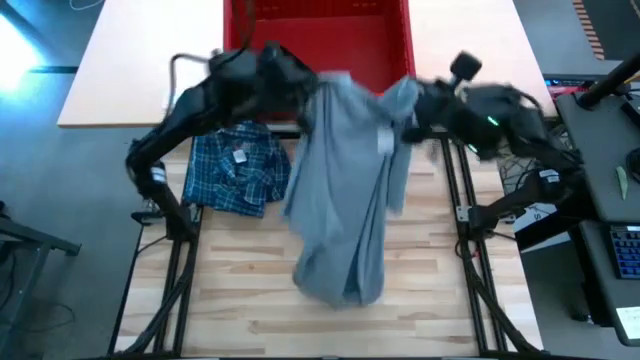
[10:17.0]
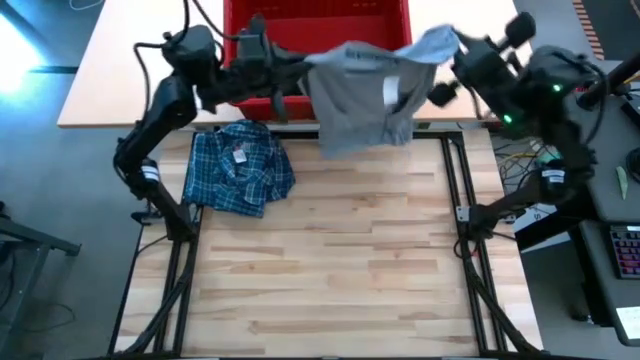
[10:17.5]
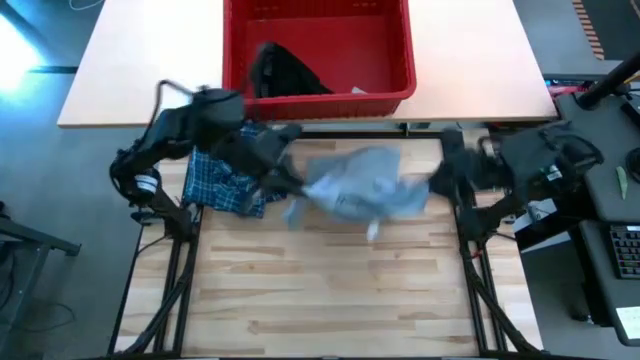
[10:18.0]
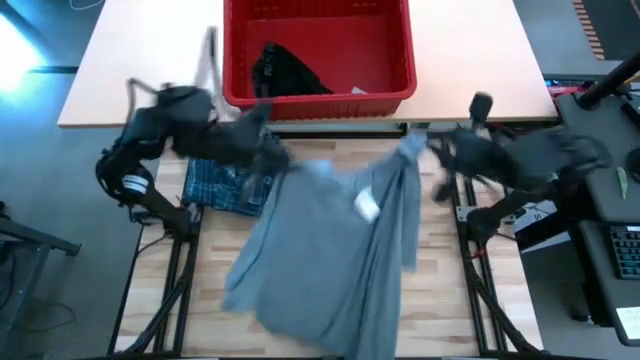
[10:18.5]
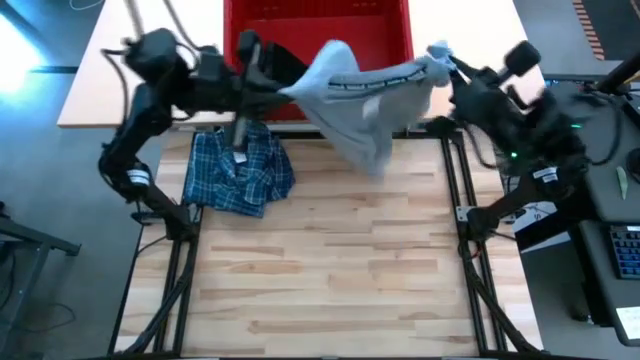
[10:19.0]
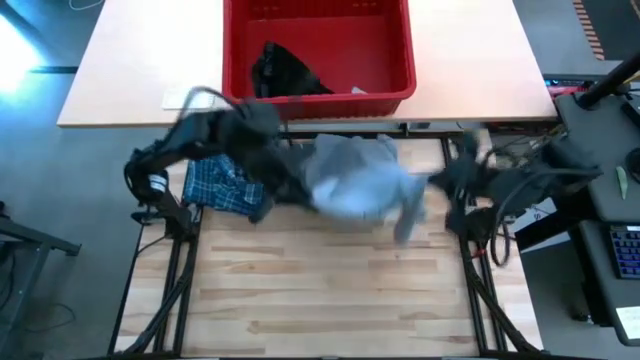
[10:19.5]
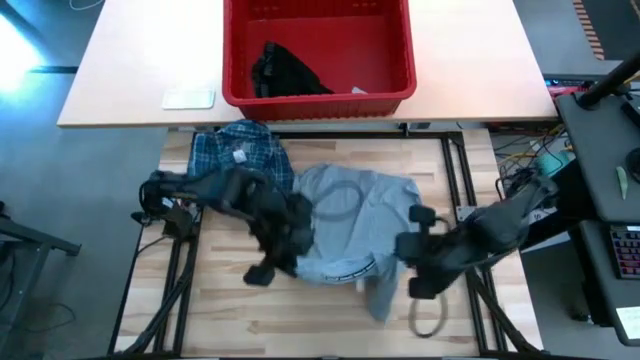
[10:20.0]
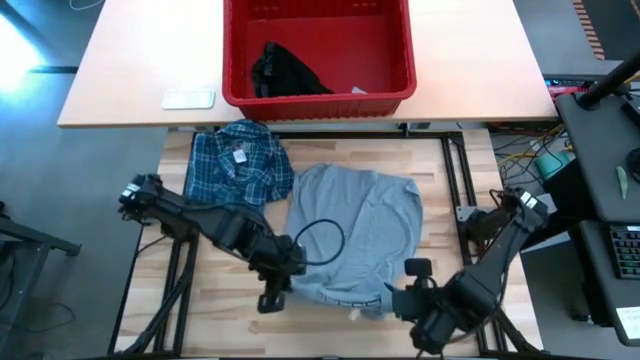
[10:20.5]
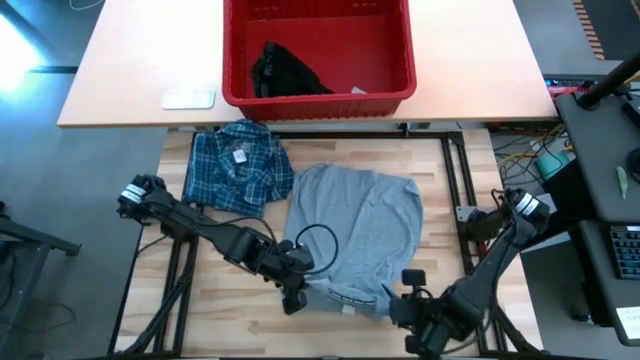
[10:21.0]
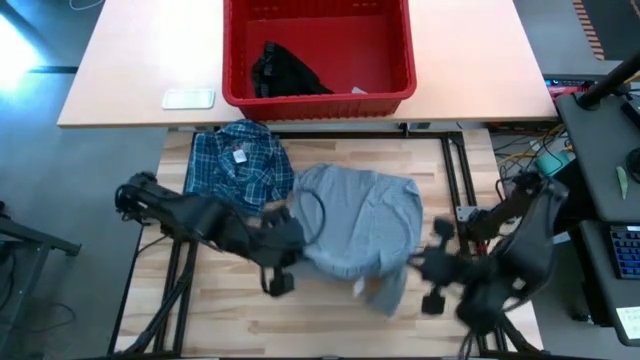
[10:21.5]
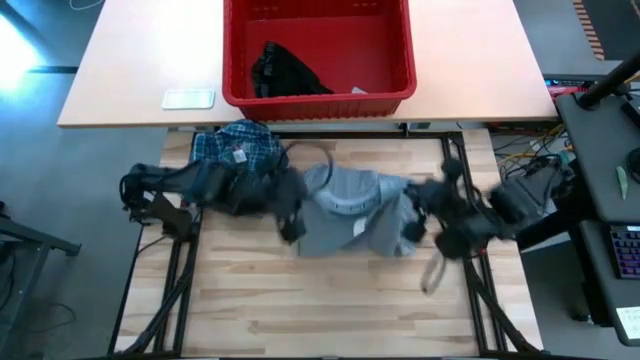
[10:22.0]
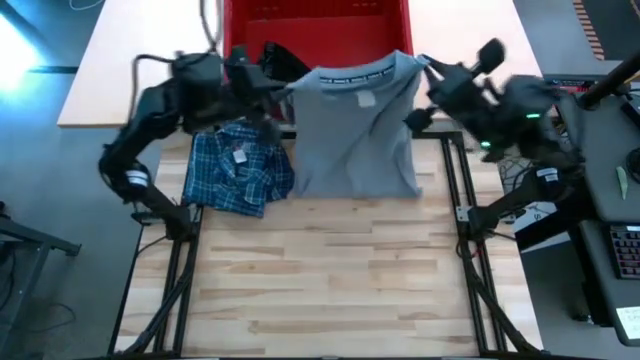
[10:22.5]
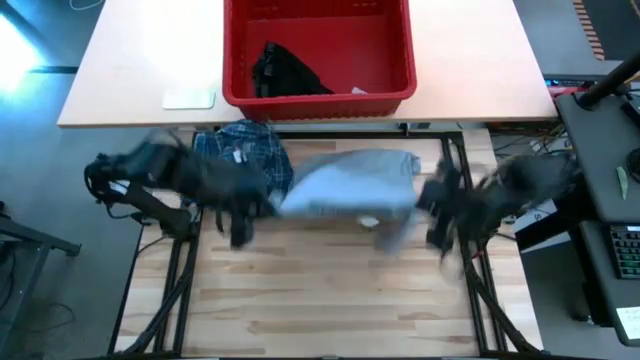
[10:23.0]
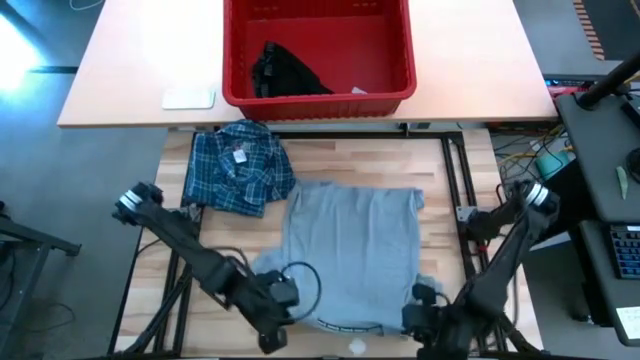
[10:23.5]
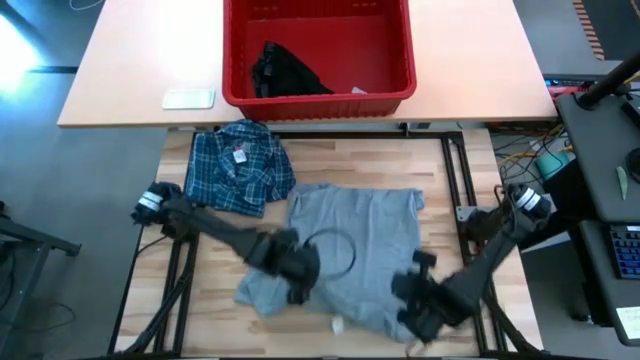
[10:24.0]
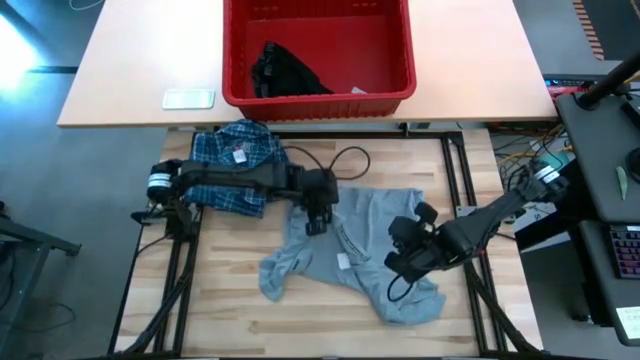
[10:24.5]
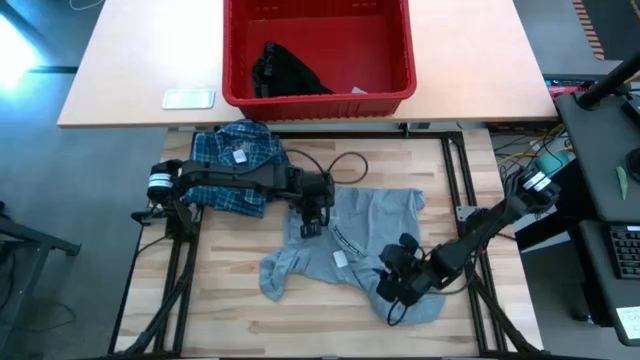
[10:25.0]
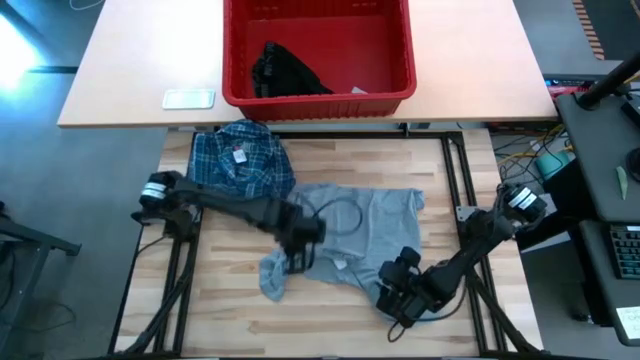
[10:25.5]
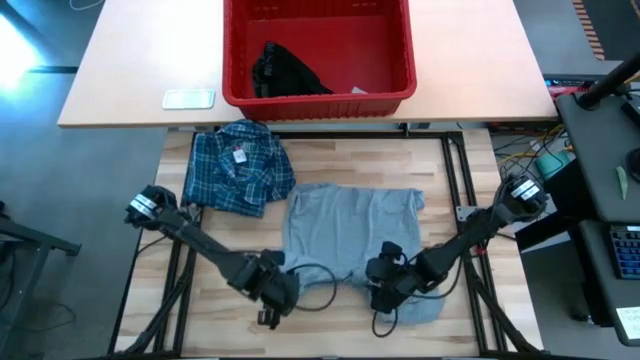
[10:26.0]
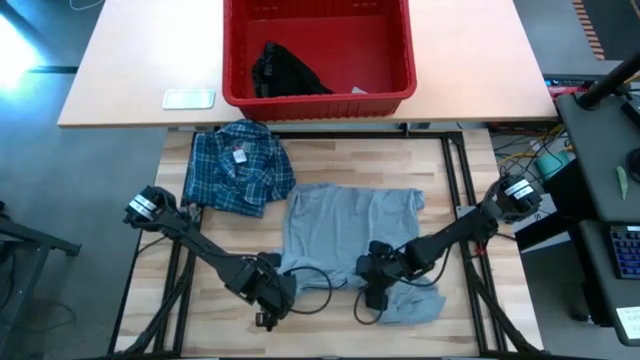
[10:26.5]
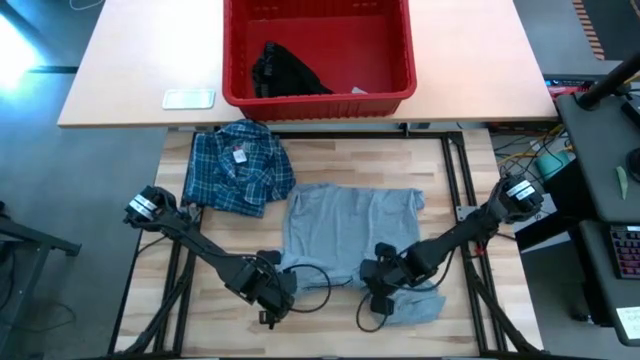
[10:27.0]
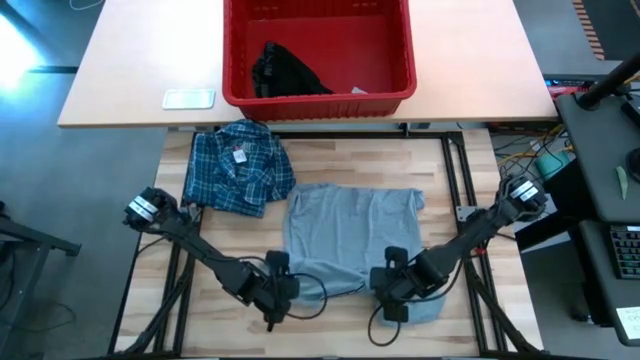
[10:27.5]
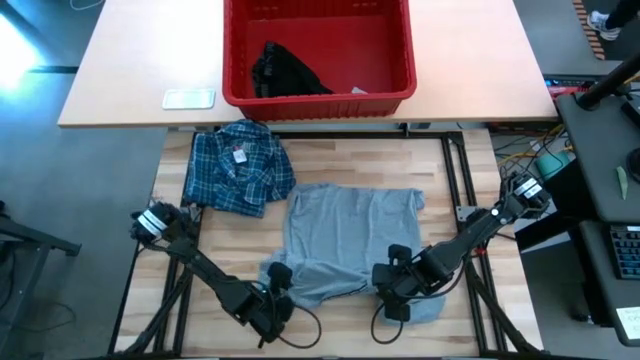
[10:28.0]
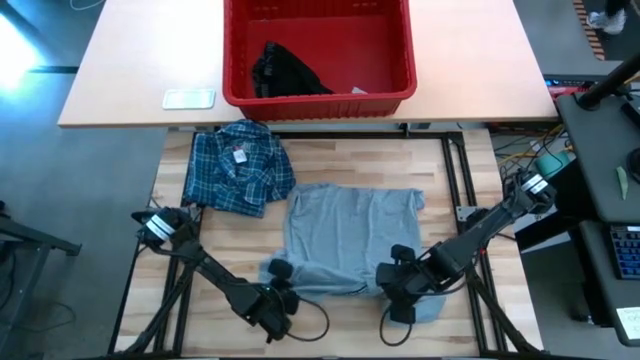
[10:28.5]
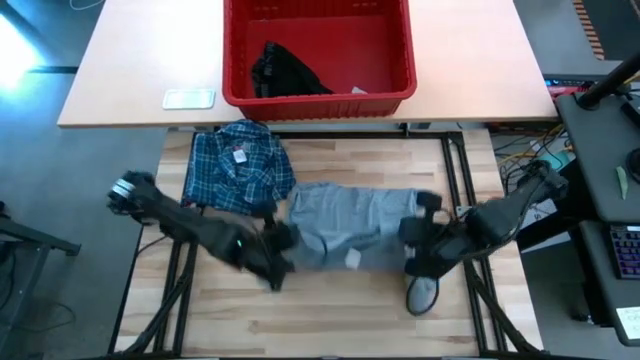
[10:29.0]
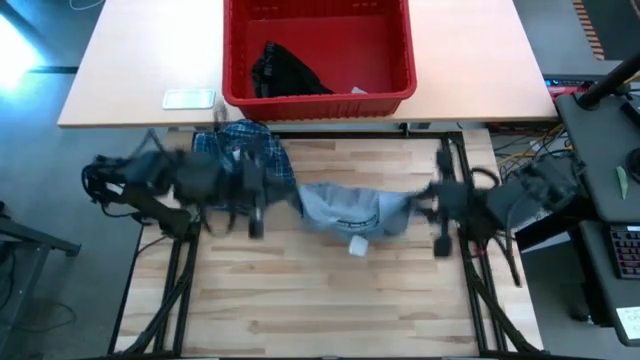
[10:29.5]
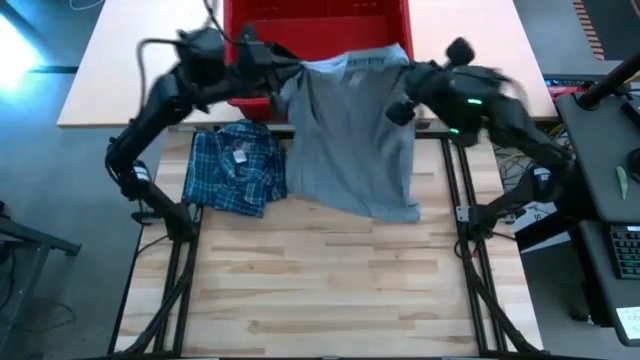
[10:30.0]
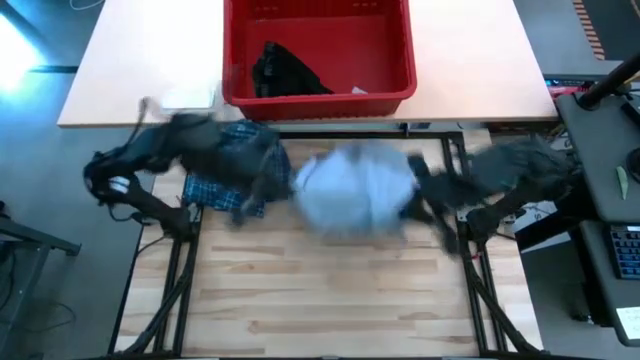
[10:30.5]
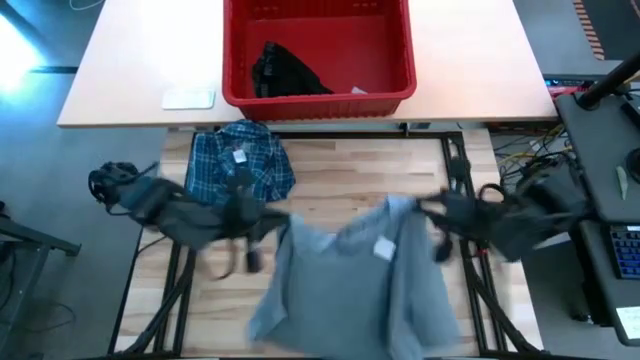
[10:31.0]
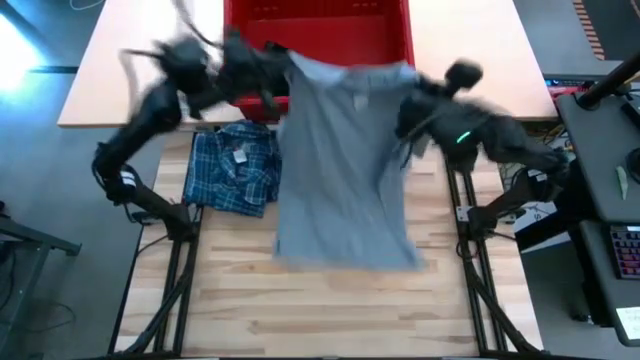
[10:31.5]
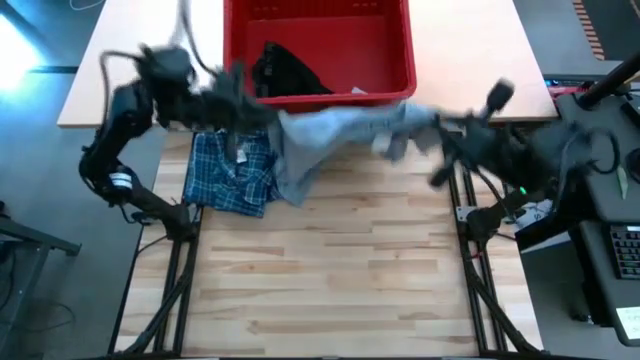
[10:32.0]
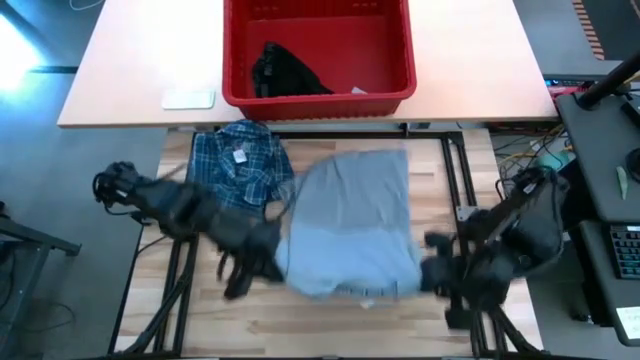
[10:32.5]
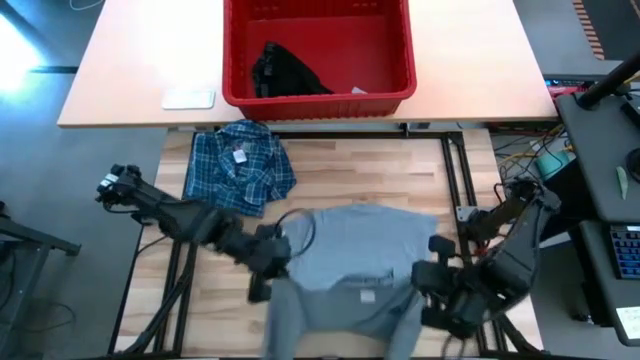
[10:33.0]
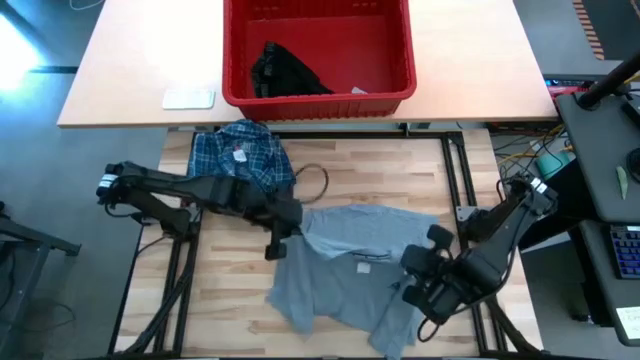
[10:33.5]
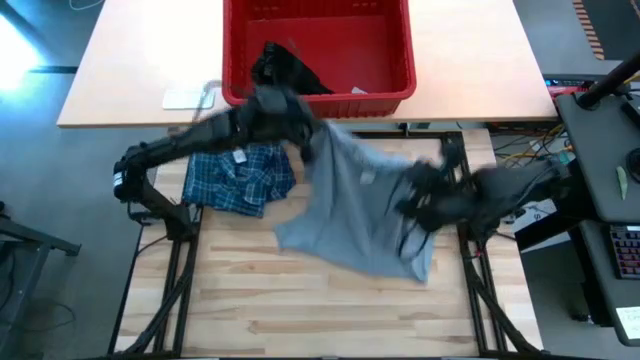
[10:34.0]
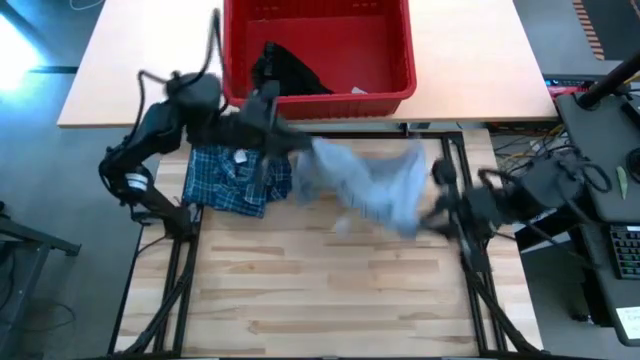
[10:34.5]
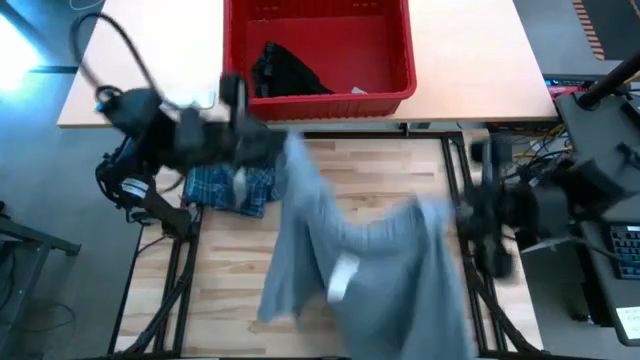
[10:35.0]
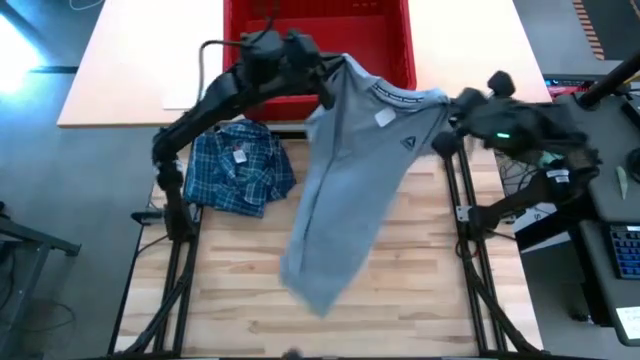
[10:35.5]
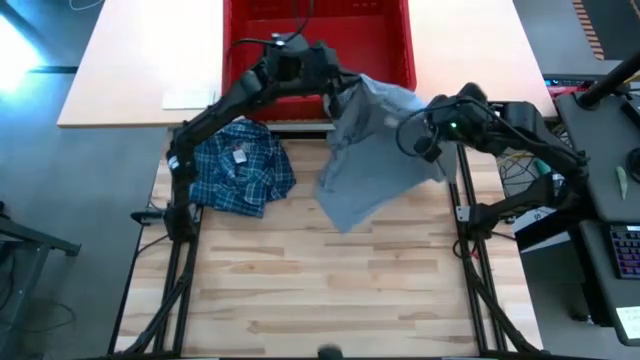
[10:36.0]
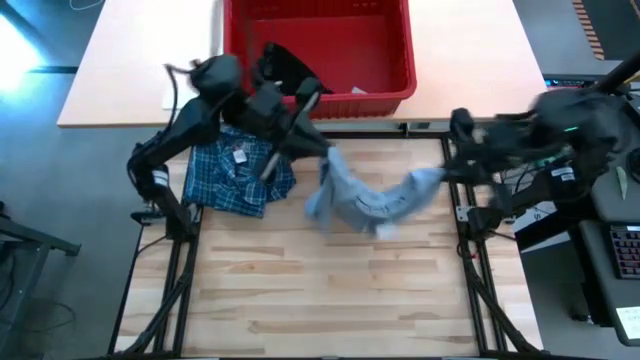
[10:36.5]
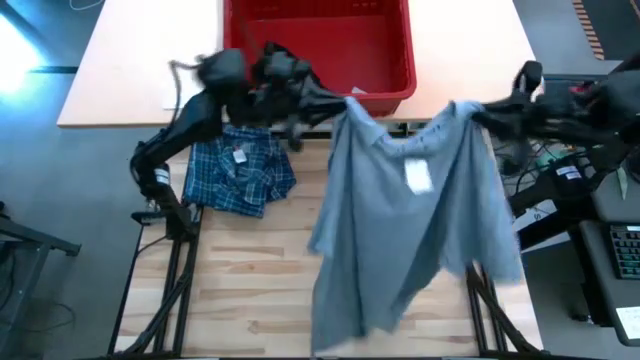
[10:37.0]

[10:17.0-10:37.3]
Task: Fold Laundry from Bin
Fold the gray shirt
